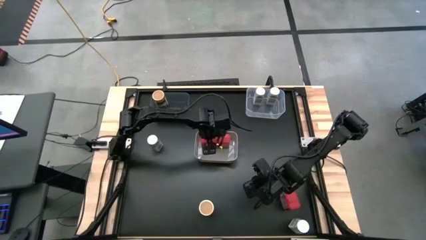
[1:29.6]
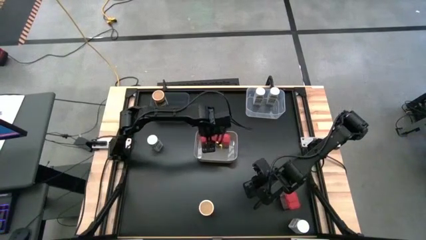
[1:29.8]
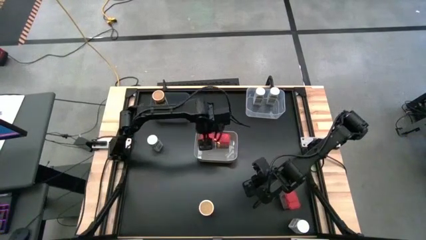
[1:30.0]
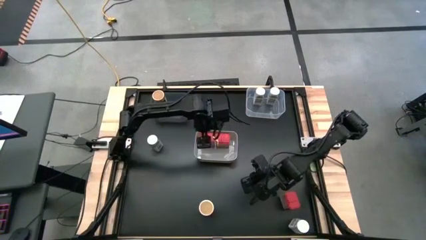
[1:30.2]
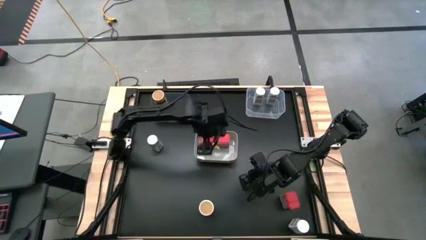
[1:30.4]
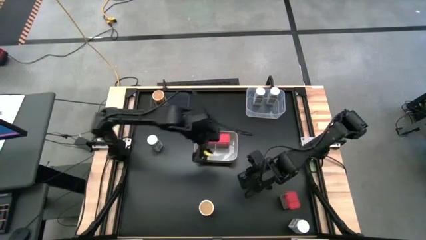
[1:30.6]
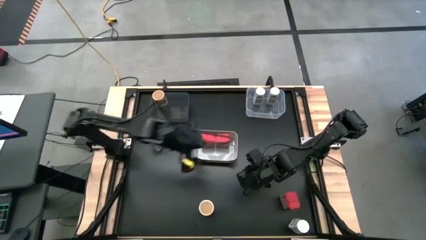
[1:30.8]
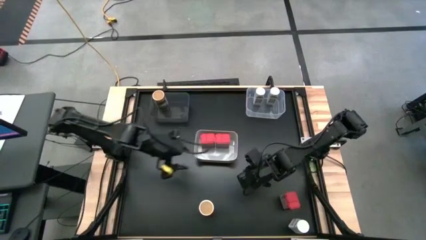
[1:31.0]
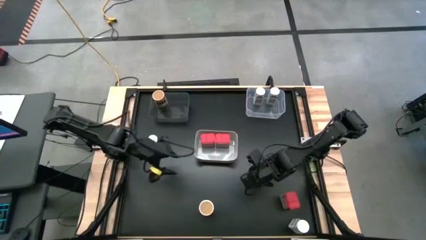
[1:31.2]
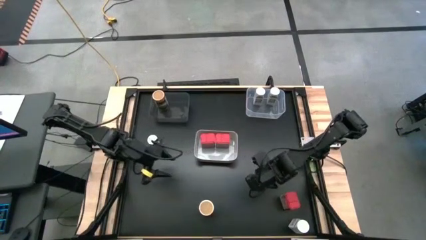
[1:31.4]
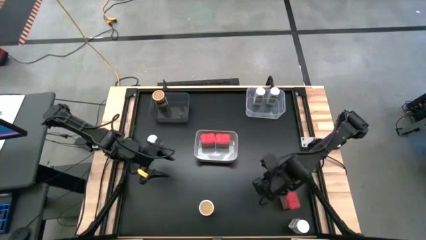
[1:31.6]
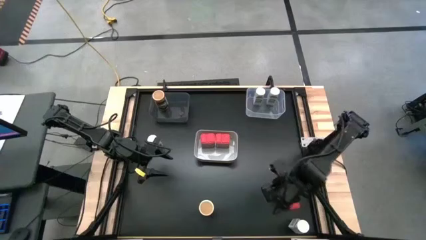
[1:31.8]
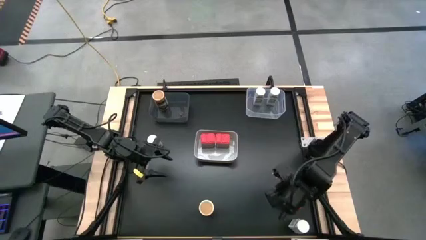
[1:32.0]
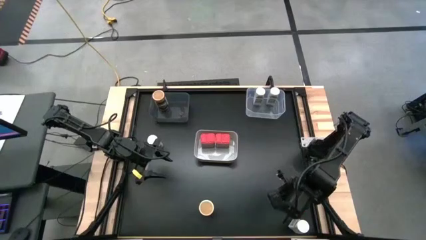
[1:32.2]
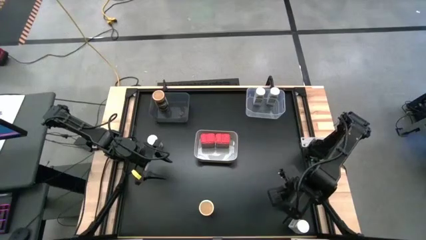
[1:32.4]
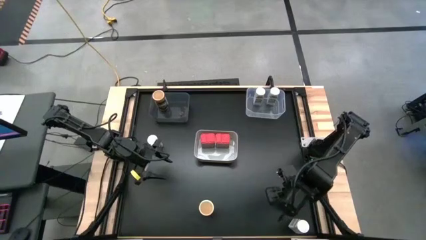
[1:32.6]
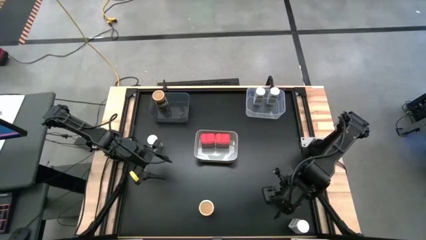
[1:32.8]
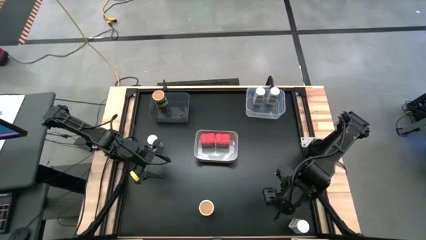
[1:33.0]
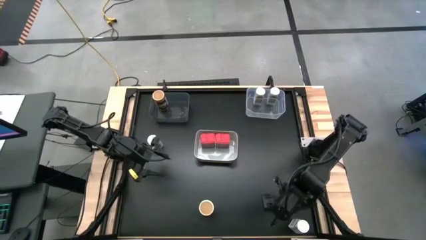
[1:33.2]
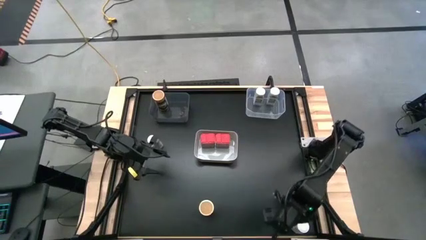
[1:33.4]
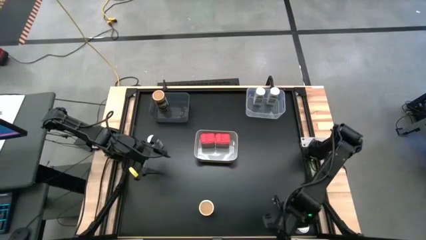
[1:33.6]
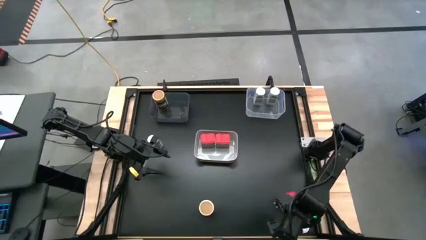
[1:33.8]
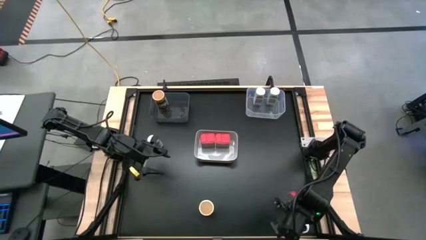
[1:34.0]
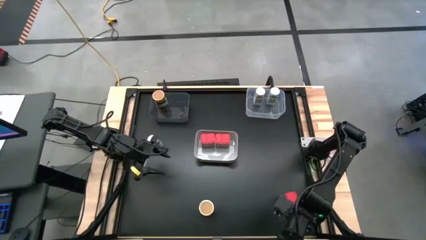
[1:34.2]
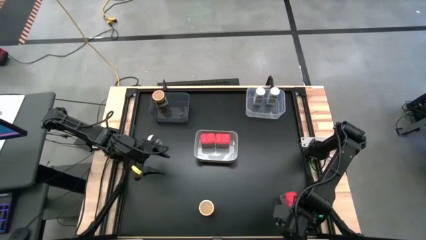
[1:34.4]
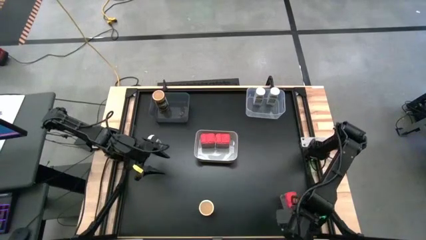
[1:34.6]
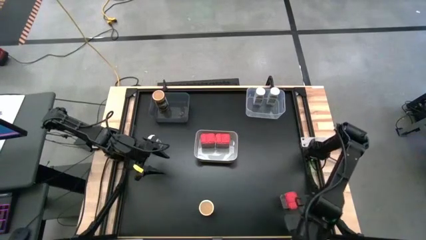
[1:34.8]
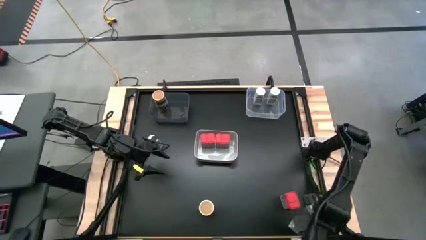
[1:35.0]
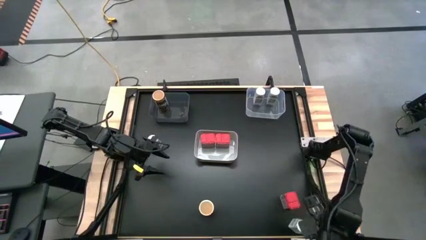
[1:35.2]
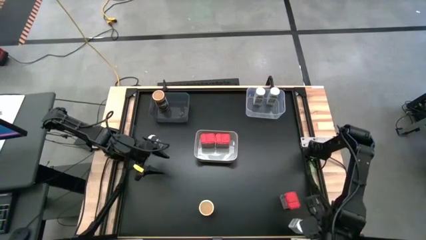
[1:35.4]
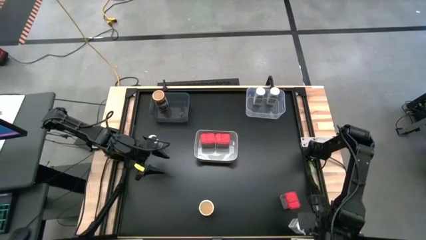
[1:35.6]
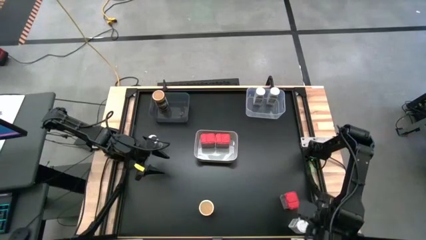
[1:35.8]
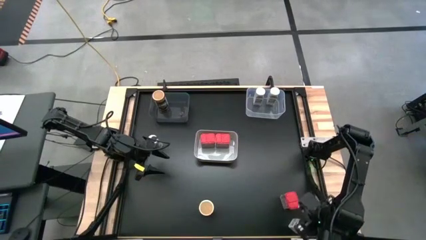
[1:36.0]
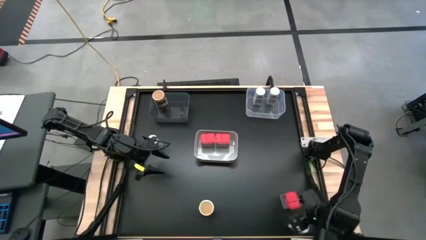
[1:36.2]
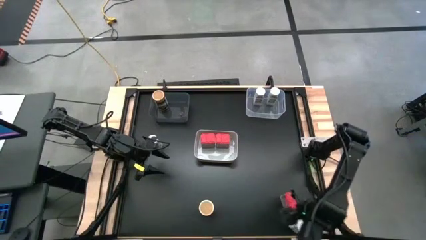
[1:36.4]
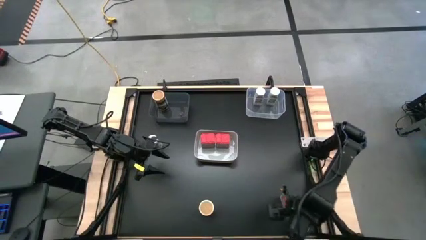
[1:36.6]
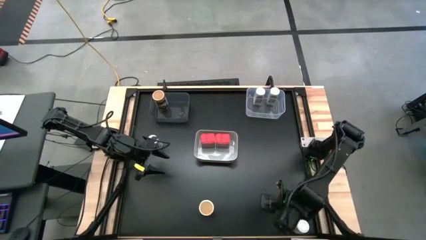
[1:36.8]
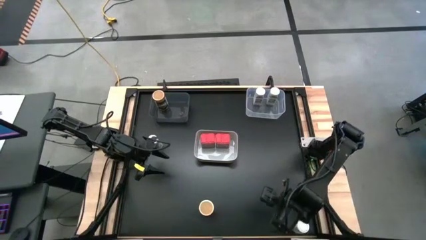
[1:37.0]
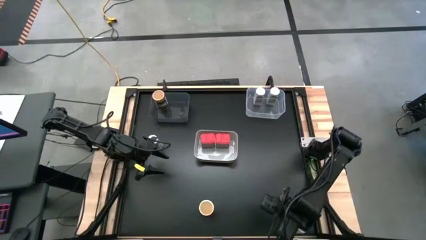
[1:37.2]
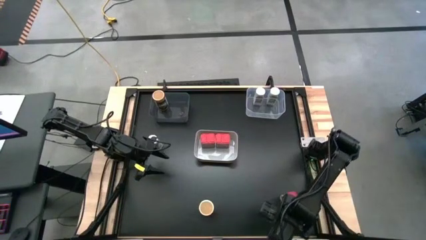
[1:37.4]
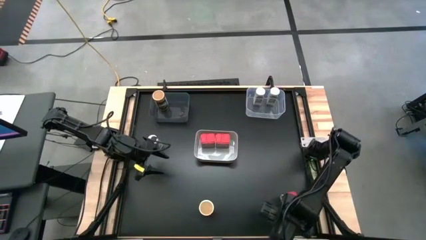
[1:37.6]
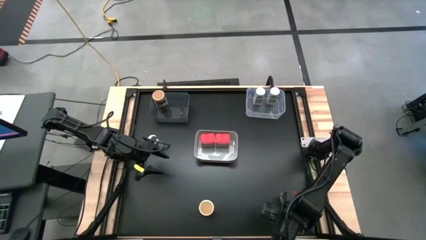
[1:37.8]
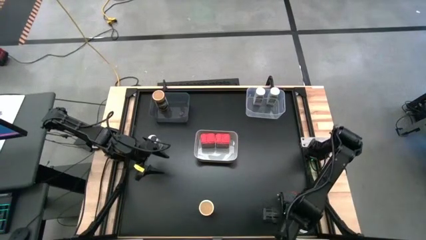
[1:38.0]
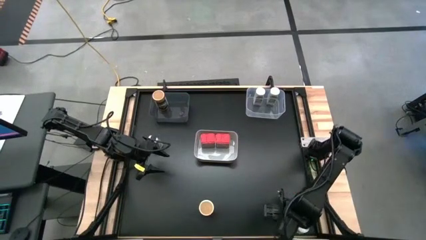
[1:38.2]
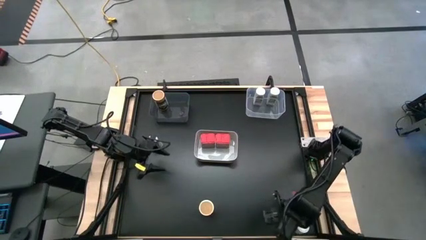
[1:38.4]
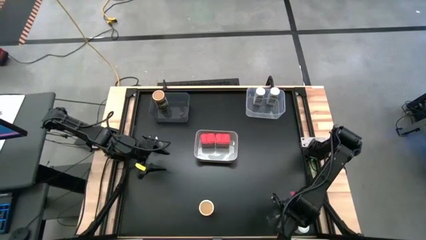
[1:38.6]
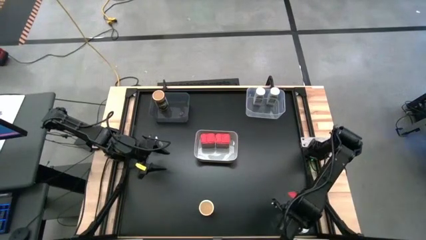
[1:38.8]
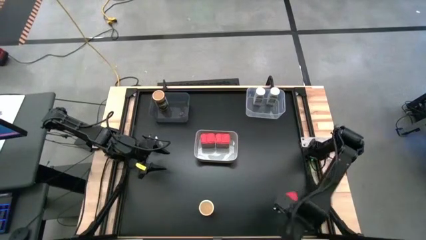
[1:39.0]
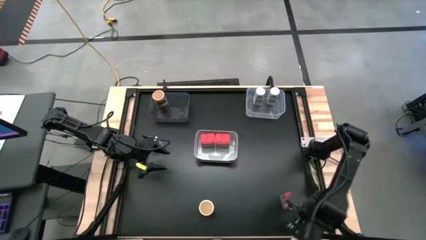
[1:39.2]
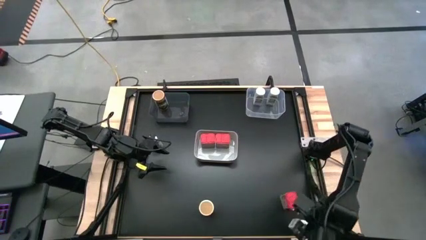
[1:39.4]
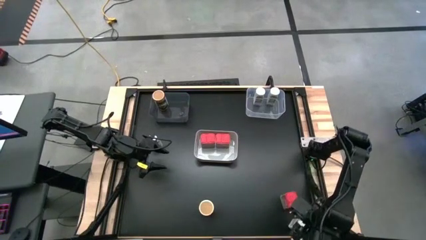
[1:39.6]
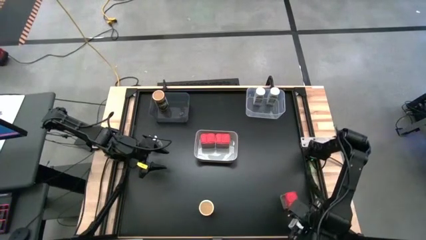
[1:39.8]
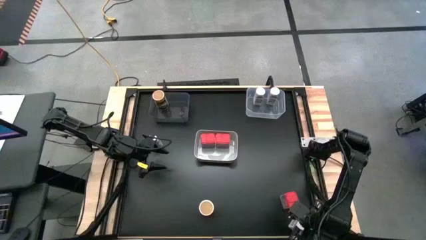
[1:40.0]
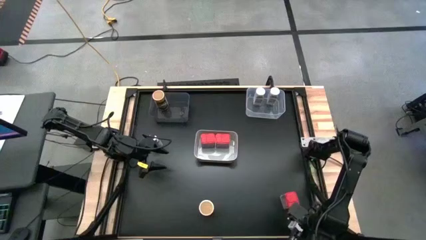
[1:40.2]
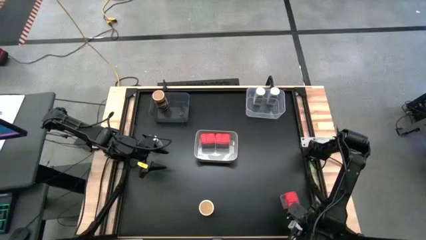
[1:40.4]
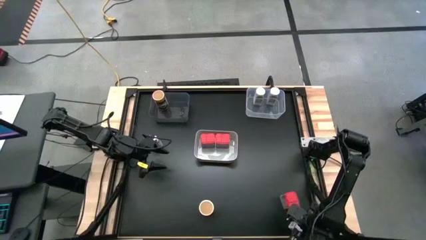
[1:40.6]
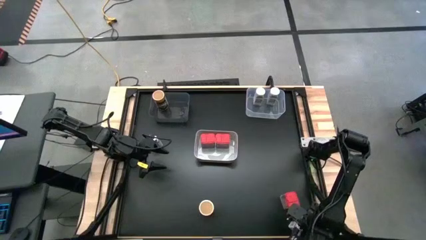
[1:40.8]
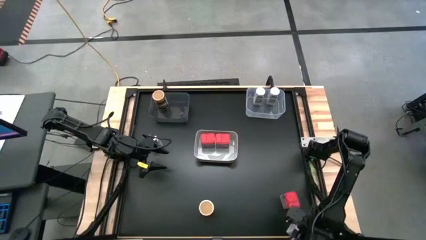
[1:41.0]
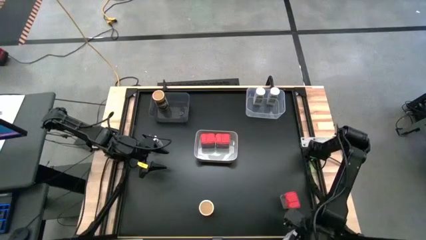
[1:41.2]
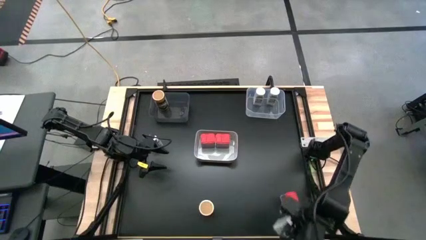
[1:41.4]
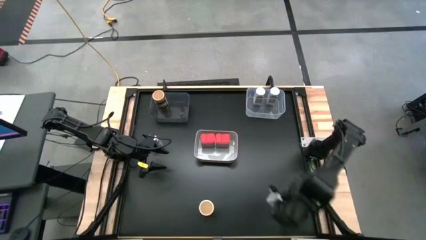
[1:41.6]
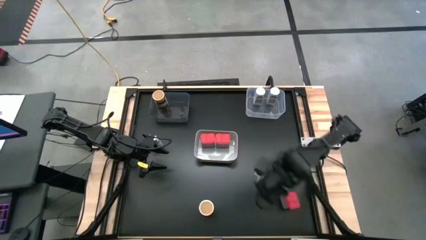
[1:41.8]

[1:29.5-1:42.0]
Task: Sort spices by type
Put the white seasoning bottle into the transparent bin

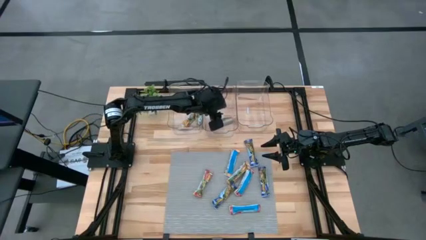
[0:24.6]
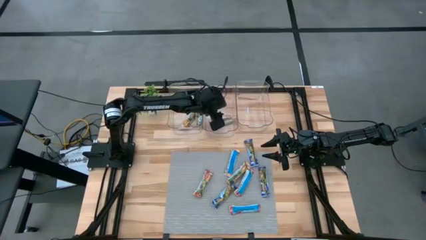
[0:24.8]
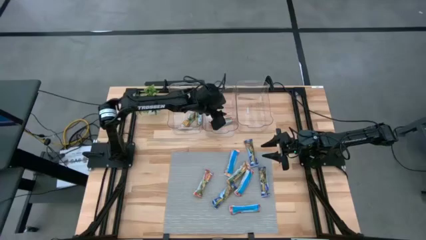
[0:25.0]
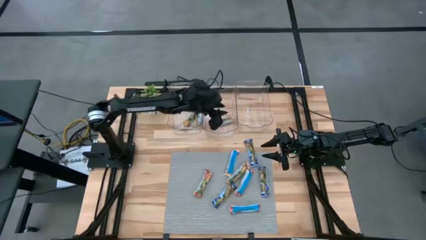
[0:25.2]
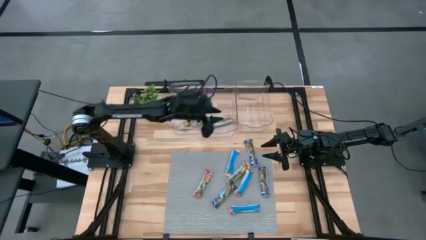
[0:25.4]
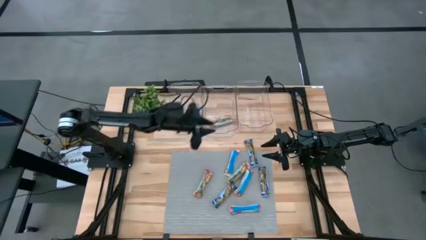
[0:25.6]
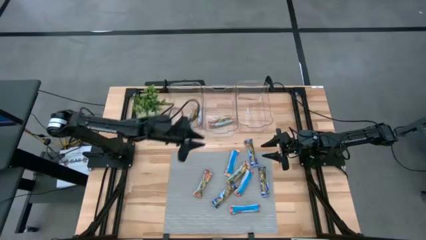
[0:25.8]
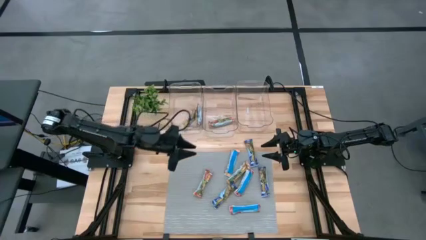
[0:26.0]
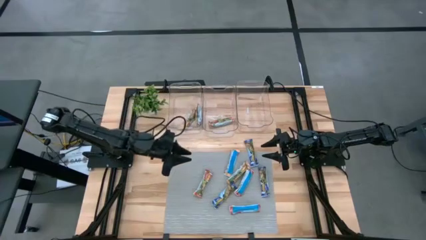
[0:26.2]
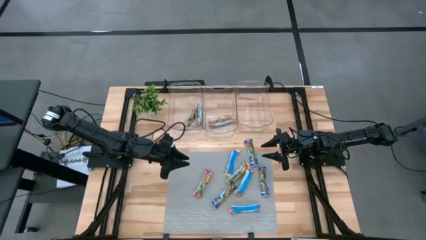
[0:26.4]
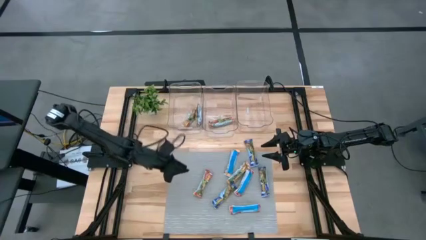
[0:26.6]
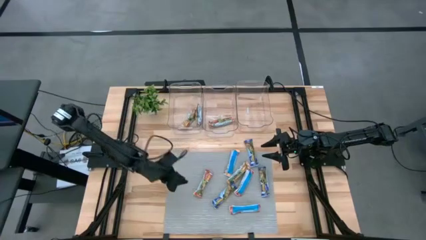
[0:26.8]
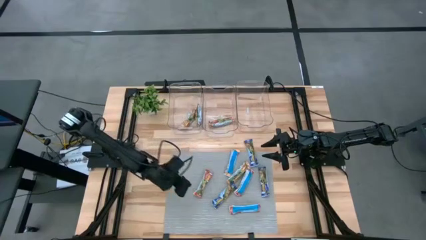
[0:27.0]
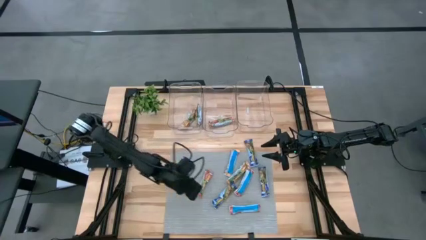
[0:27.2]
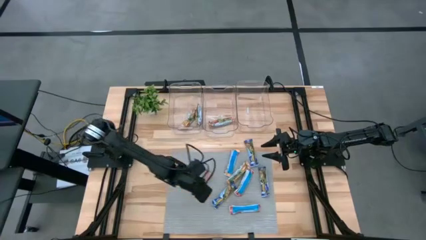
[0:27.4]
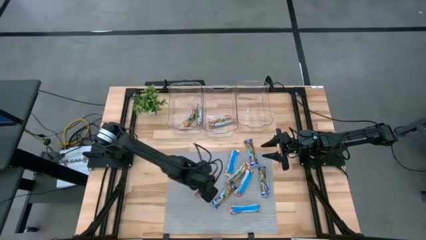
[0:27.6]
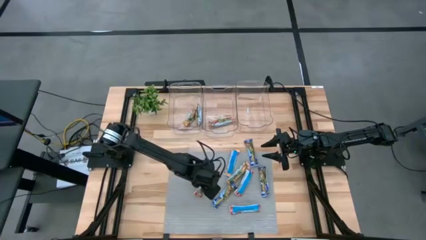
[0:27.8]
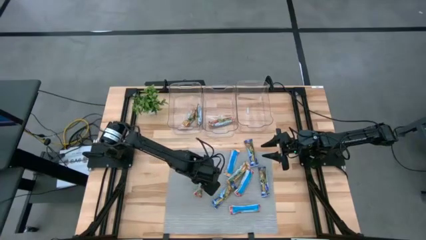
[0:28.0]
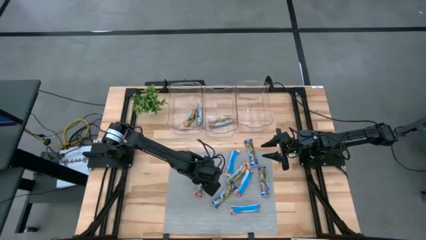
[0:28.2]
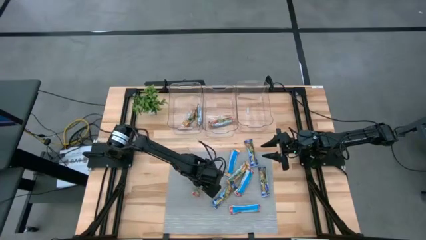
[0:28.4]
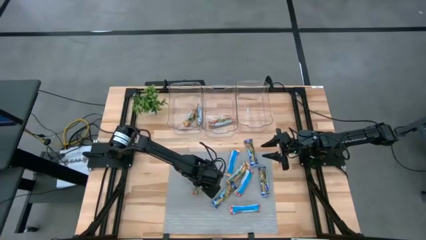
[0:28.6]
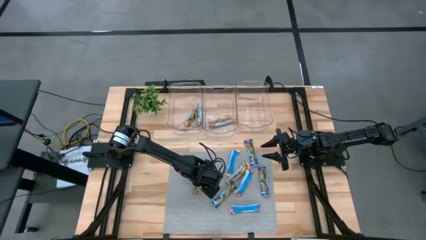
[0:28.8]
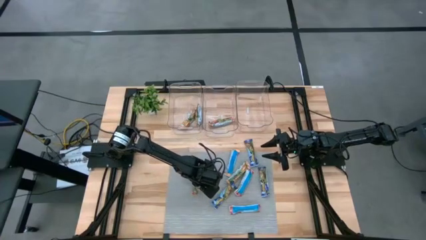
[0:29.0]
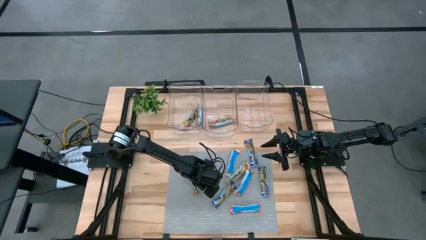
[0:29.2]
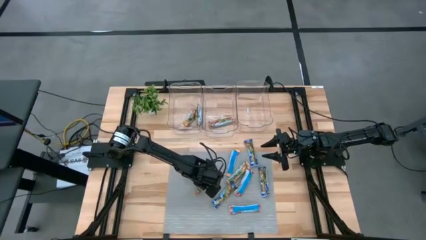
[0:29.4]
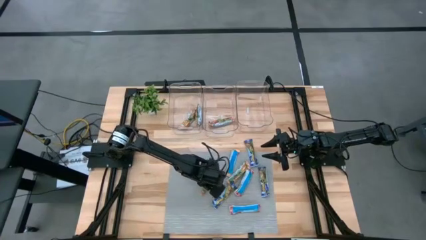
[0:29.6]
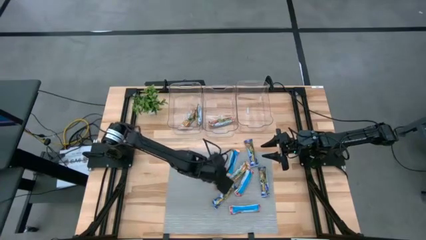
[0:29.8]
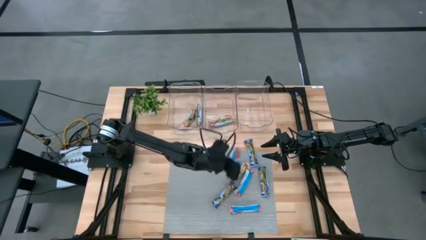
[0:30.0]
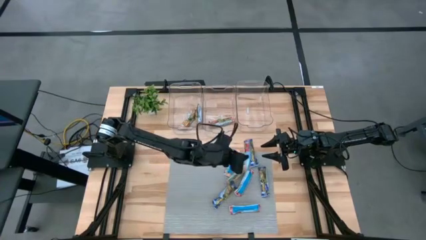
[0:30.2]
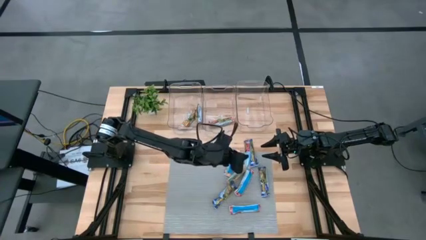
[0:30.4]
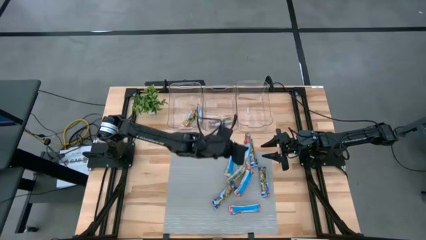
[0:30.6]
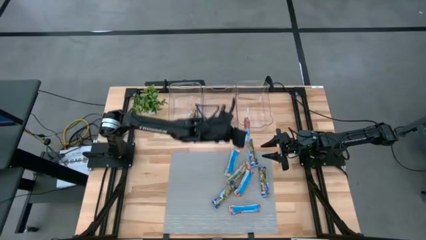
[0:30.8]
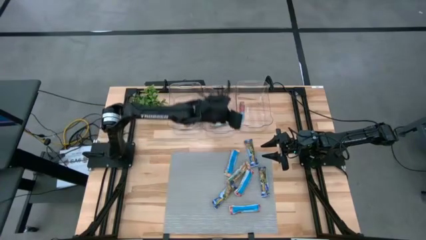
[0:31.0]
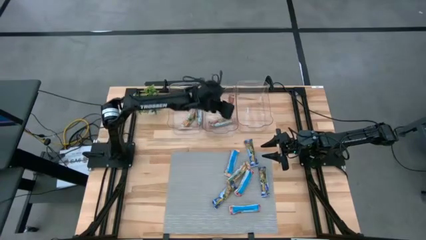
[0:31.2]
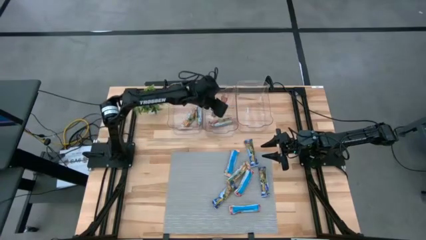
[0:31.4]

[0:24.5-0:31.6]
Task: Pick and place Granola Bars by type
Put the red granola bar into the middle transparent bin
